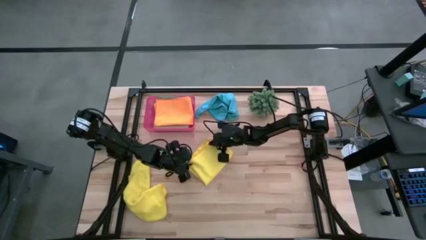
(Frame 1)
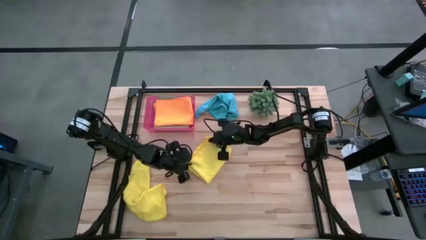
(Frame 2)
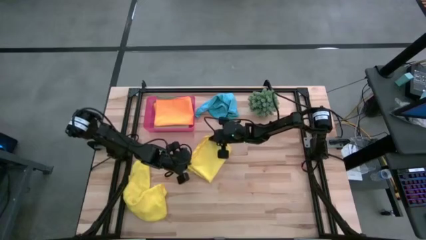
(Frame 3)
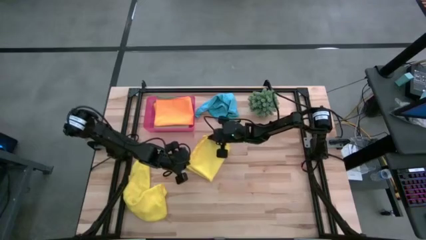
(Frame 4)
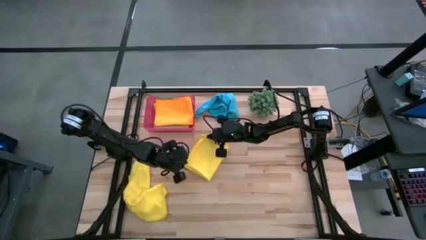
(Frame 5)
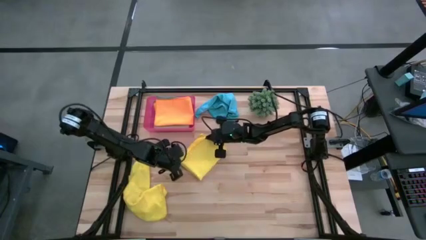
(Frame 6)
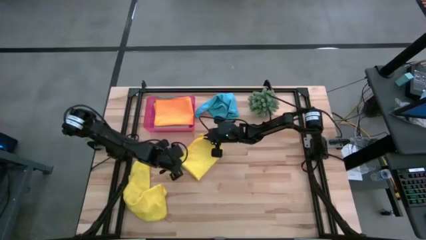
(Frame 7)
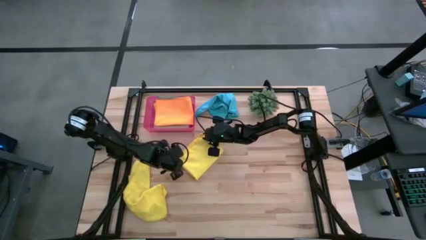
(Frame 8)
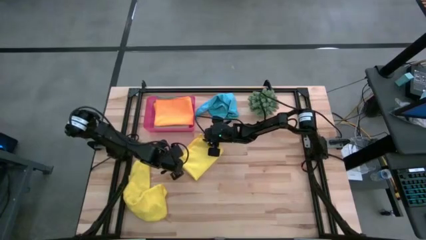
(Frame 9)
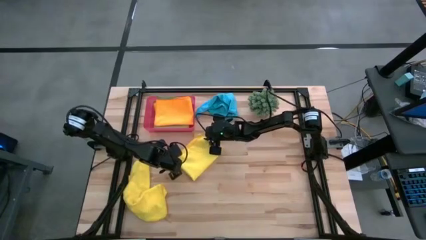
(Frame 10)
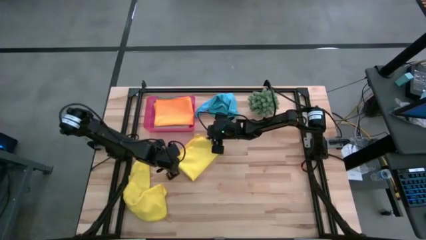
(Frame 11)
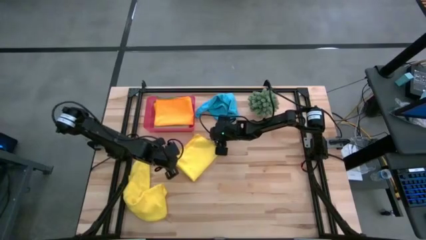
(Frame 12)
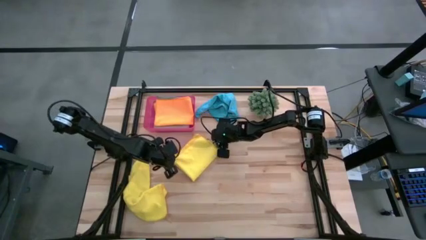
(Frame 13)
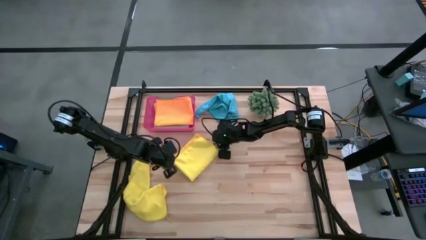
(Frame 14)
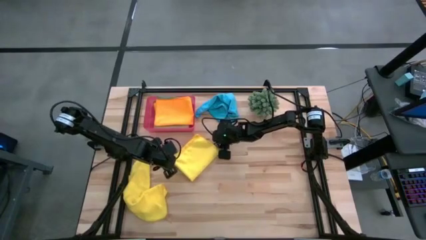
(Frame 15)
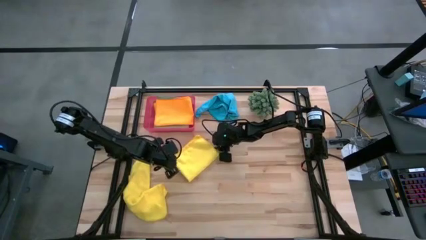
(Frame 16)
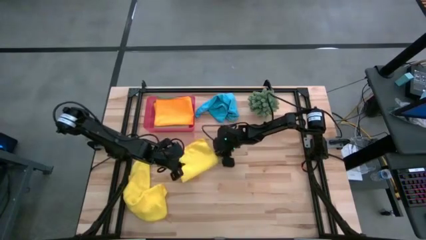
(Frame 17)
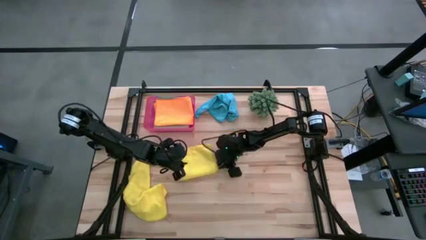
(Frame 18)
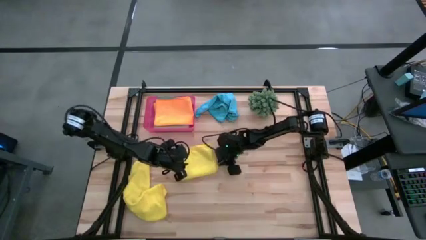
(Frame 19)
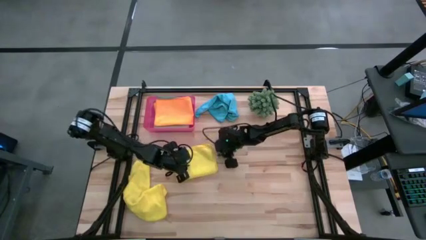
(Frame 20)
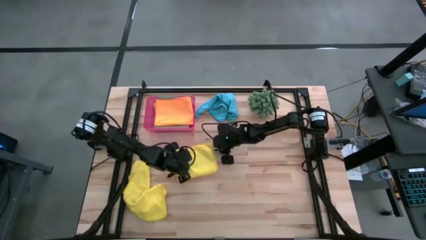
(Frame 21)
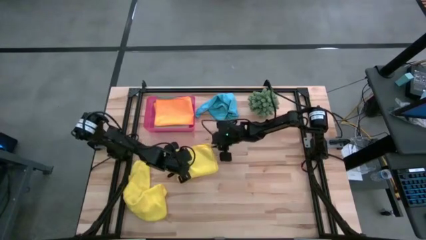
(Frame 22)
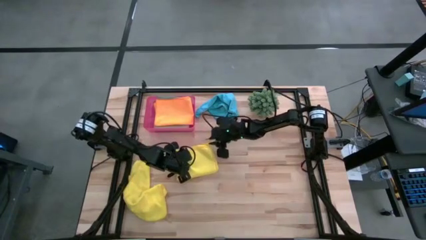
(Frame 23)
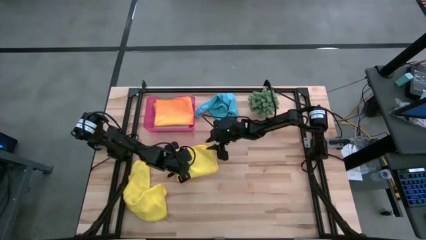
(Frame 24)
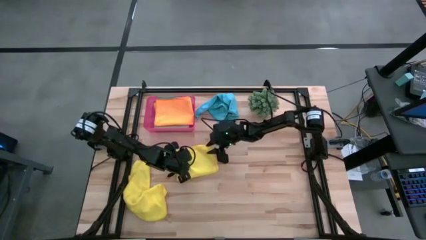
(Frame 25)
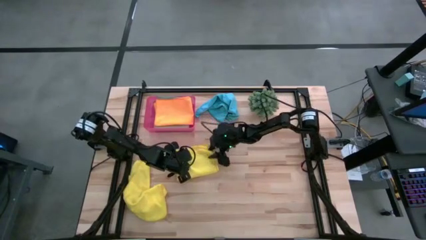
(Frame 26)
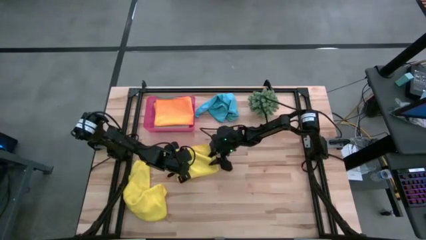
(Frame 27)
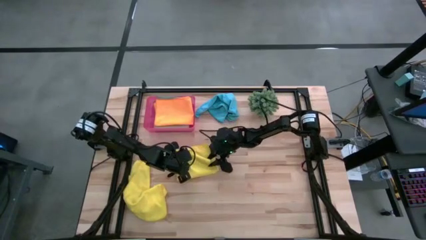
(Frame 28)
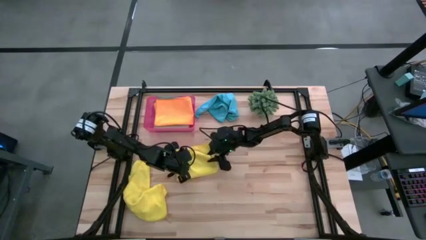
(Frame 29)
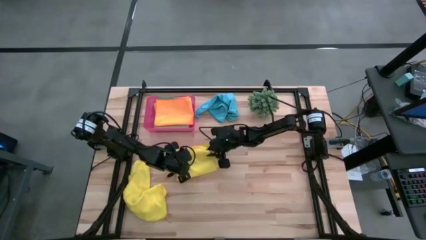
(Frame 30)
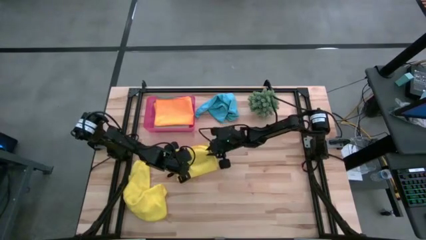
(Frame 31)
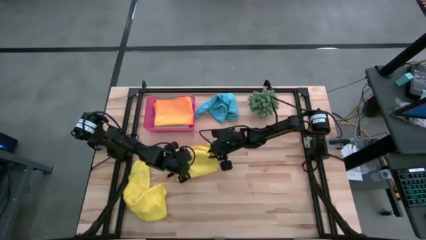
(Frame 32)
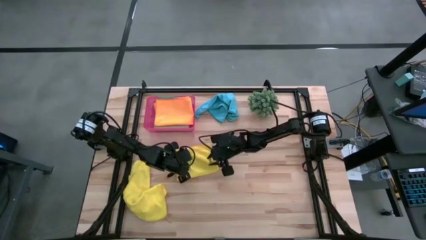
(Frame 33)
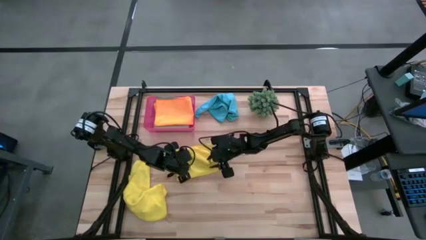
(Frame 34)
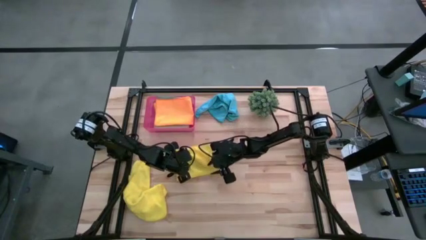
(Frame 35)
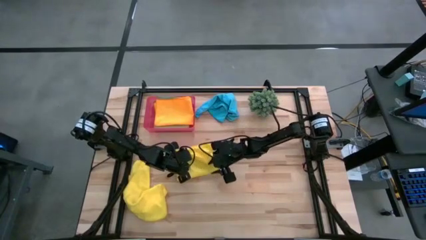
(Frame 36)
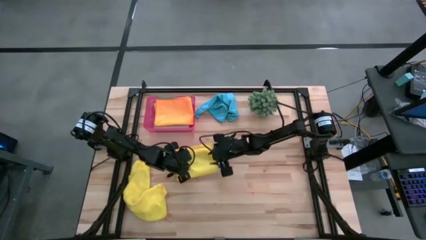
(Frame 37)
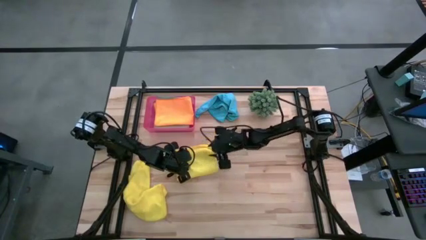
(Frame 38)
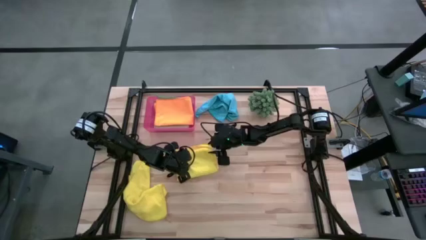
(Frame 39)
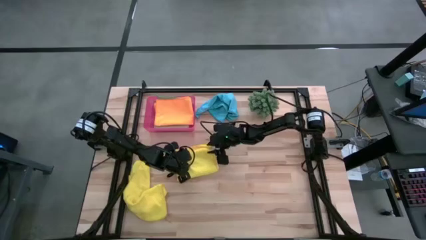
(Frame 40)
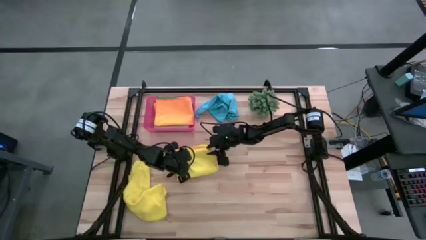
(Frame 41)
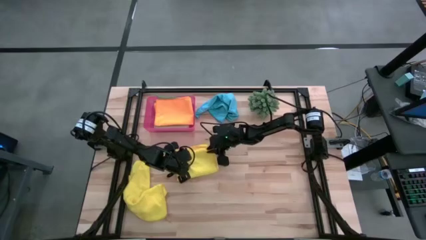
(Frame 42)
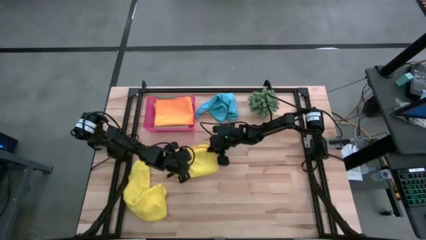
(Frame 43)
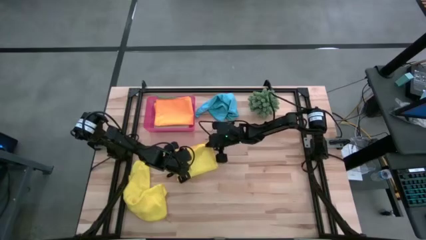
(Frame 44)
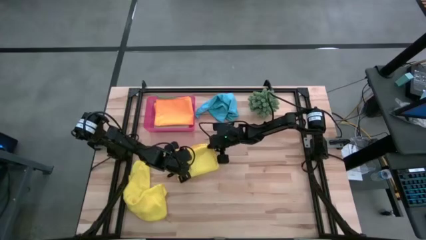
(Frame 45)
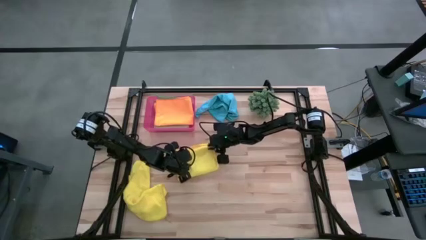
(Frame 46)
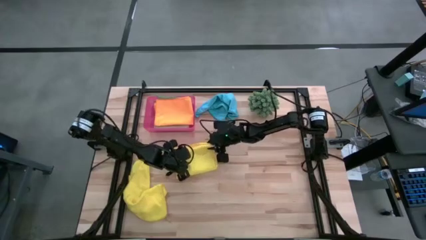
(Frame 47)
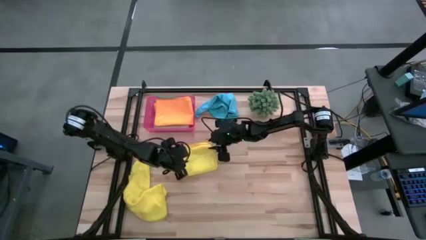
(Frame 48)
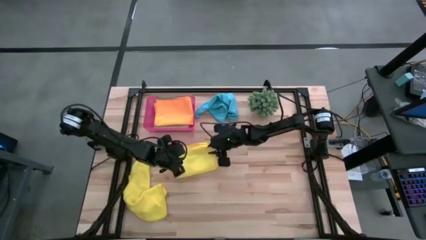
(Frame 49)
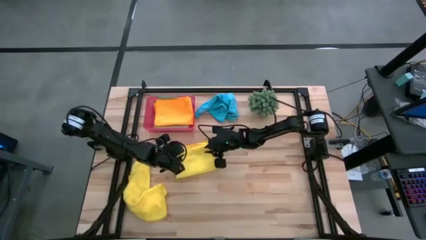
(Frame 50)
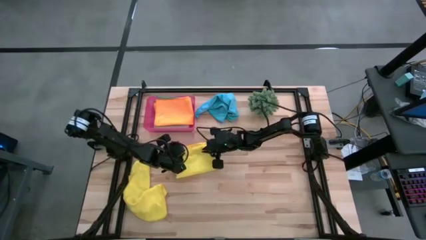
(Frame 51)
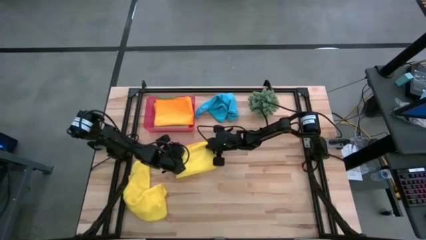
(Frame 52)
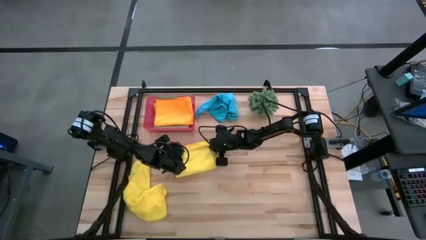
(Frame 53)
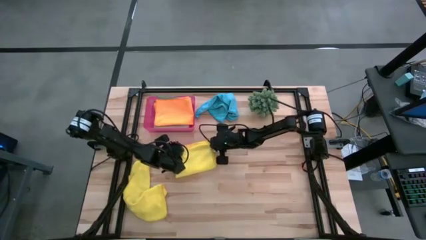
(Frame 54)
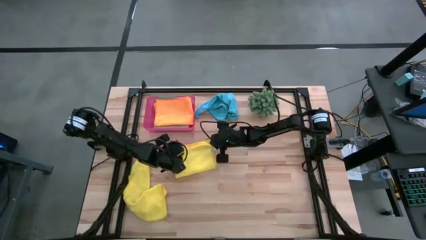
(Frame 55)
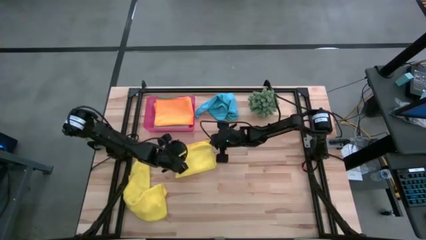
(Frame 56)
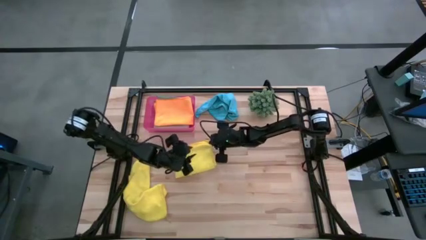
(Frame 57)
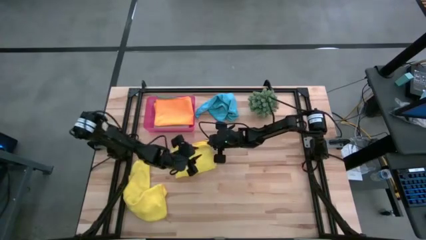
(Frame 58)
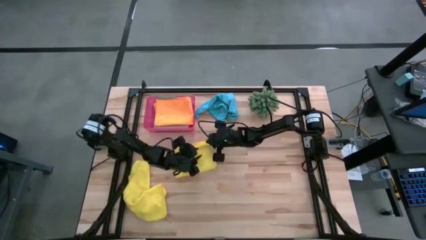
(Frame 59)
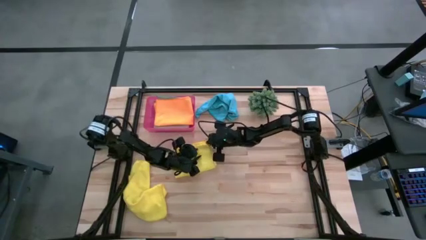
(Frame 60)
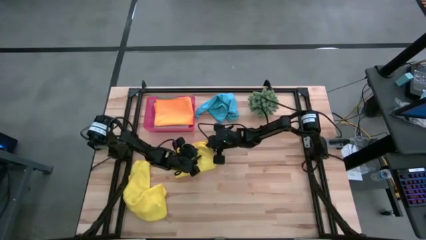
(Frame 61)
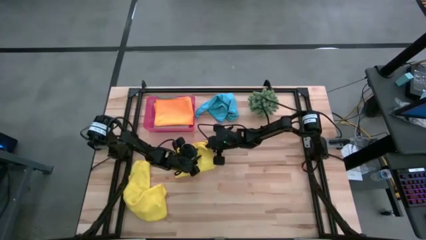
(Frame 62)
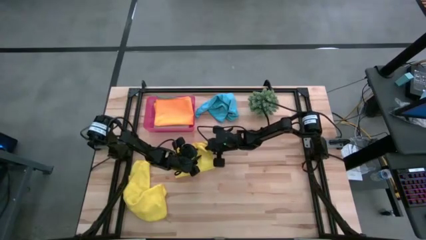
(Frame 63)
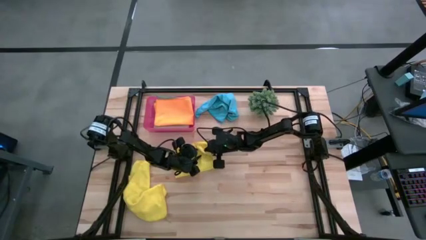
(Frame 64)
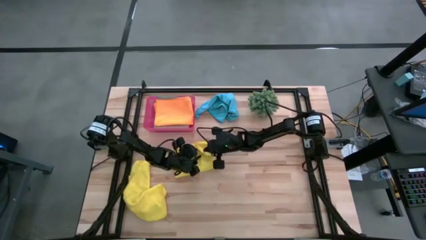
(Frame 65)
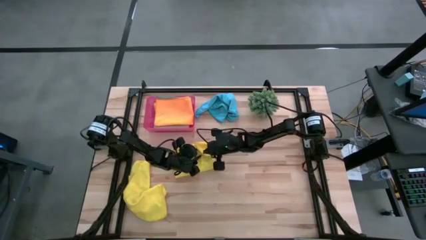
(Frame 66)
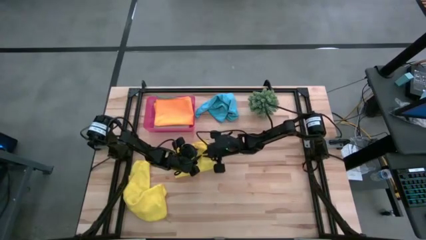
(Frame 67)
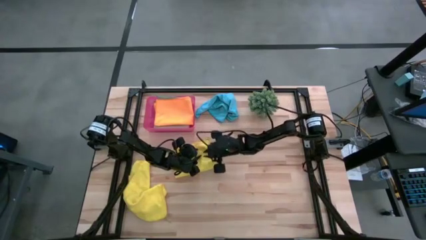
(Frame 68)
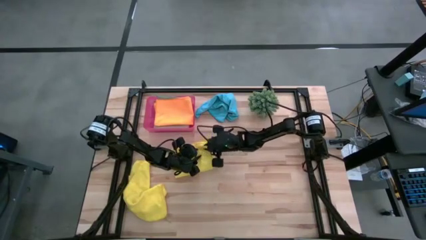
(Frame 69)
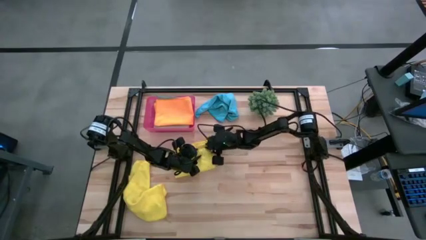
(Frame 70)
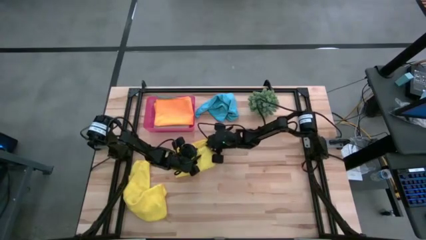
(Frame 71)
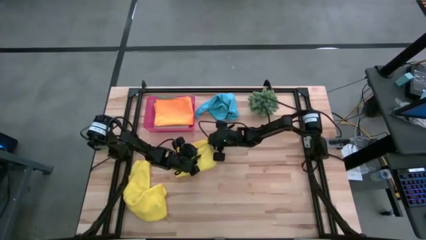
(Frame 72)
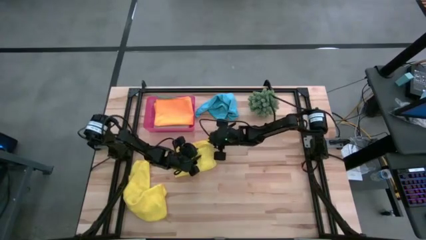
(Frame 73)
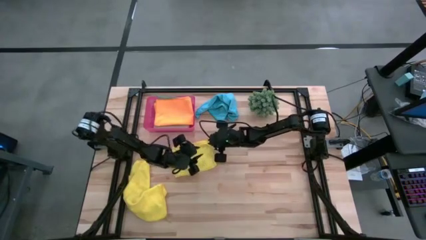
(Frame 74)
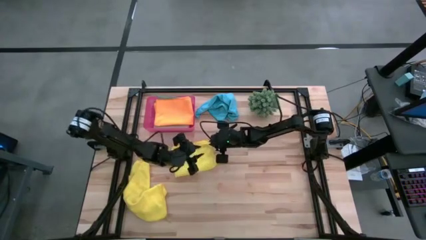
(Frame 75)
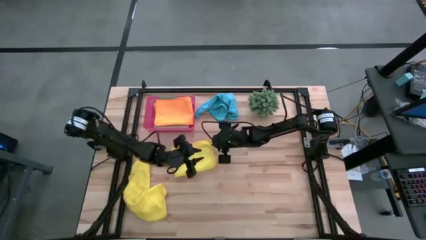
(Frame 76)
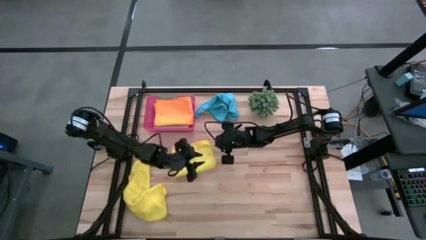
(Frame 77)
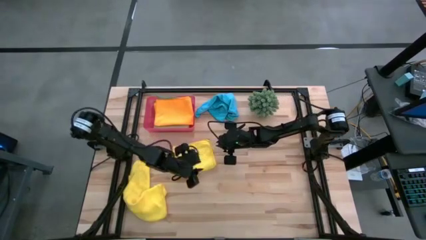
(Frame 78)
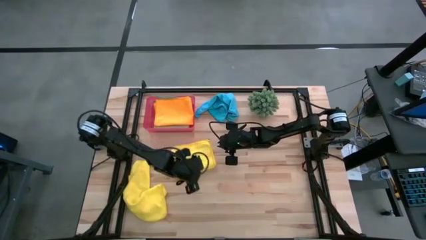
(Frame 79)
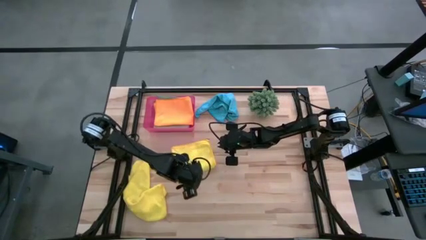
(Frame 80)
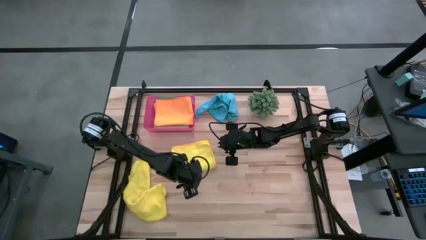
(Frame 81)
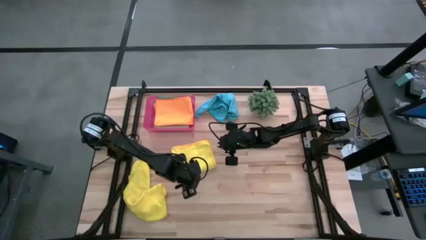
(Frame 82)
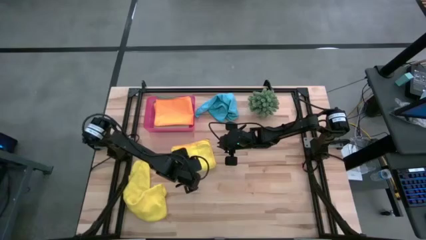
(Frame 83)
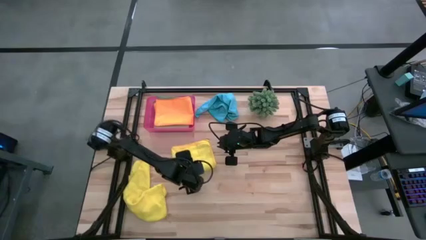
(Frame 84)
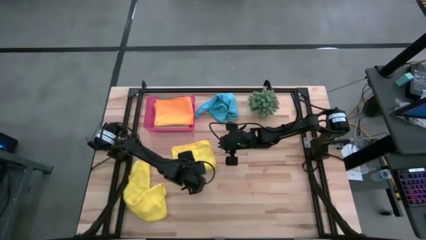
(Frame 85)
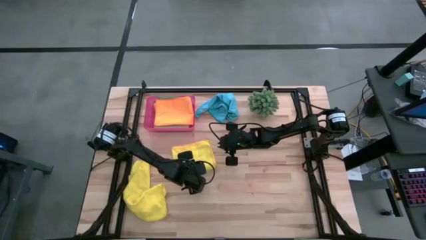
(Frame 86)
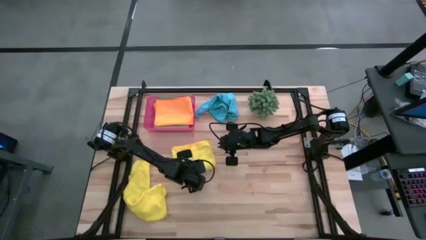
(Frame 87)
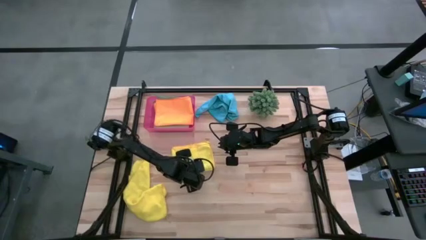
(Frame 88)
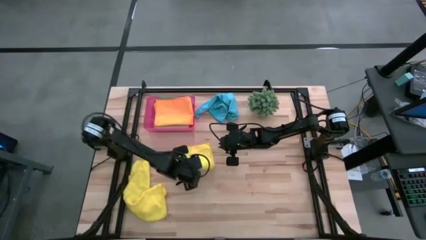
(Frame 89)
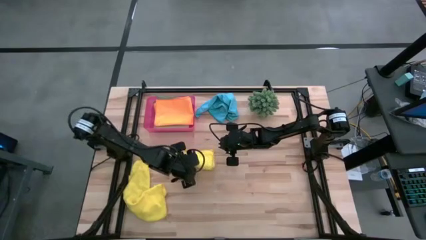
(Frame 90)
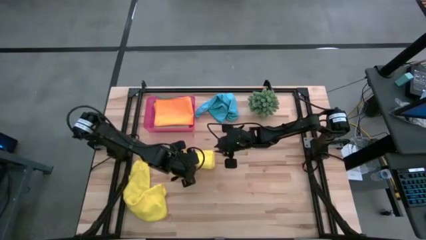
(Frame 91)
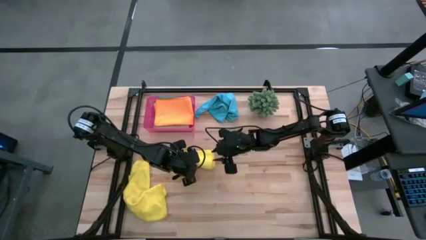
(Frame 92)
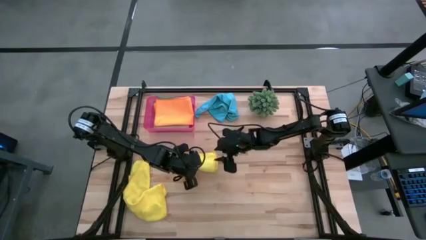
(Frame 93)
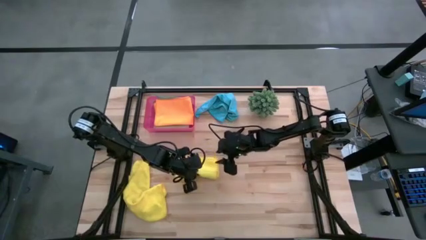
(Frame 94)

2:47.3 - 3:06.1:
Task: Fold microfiber towels
Fold the right yellow towel
